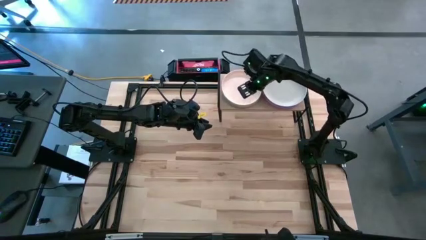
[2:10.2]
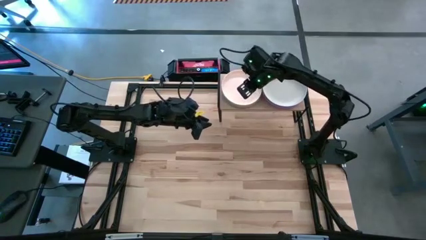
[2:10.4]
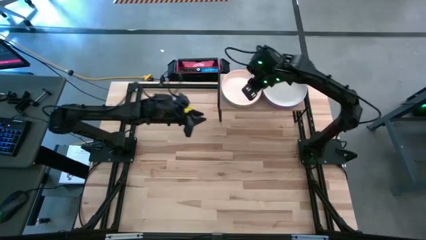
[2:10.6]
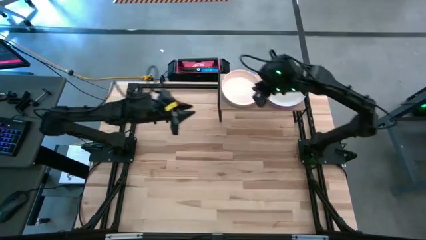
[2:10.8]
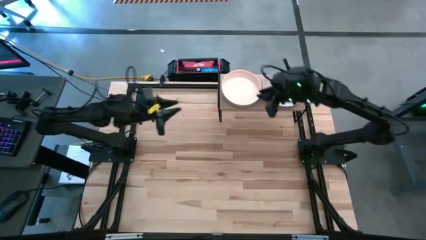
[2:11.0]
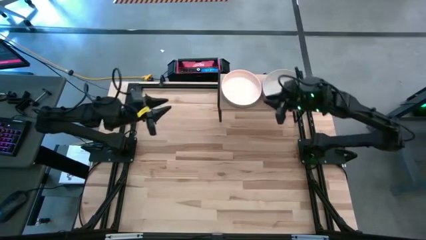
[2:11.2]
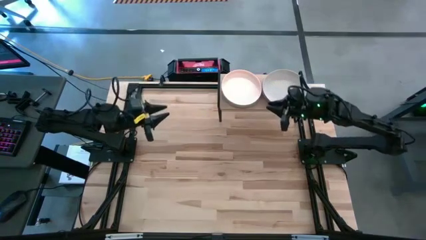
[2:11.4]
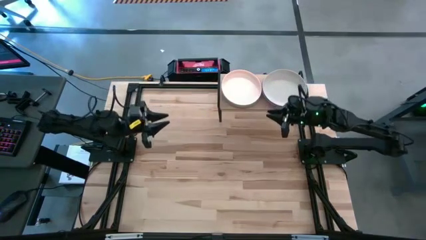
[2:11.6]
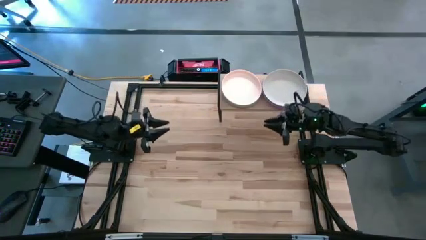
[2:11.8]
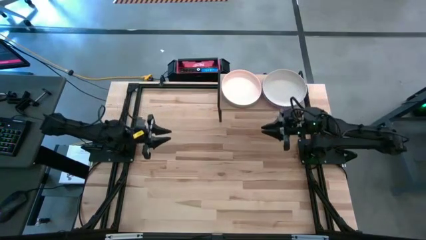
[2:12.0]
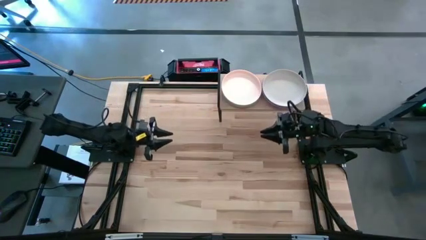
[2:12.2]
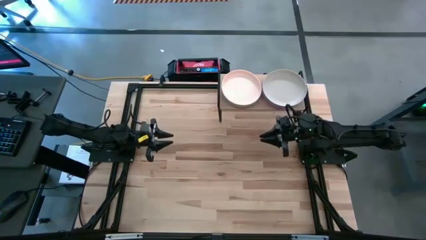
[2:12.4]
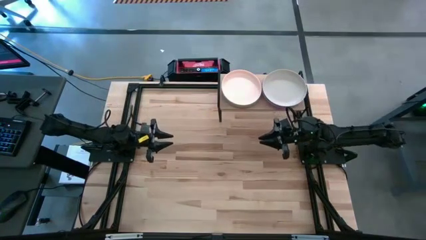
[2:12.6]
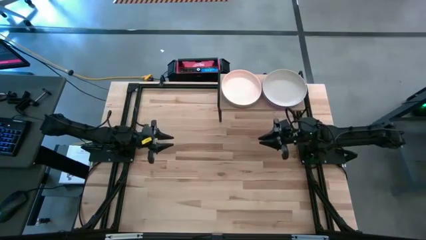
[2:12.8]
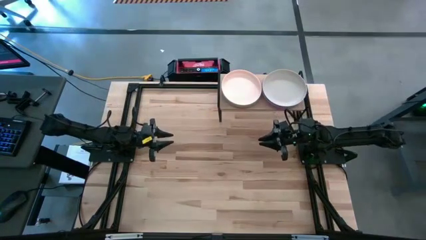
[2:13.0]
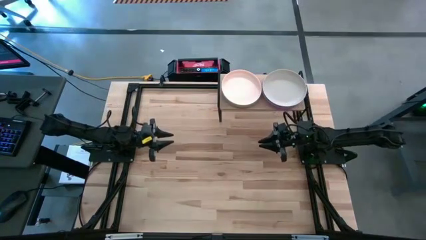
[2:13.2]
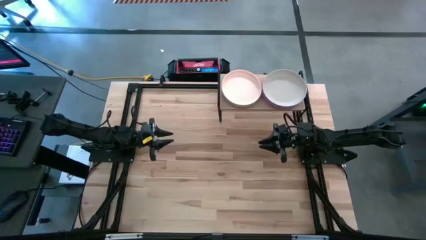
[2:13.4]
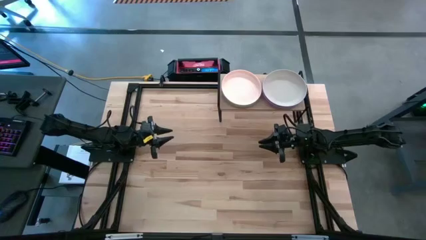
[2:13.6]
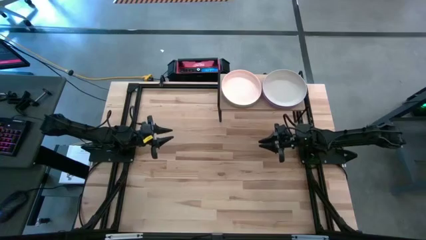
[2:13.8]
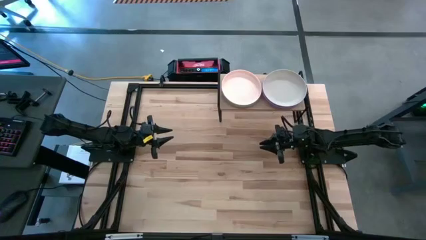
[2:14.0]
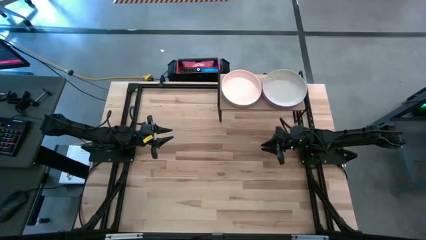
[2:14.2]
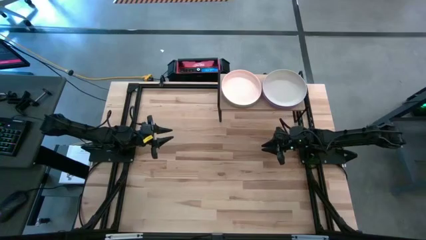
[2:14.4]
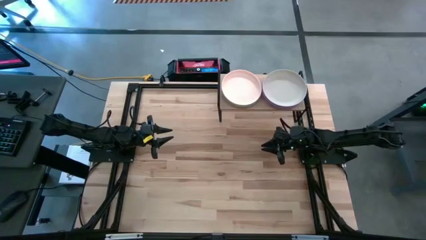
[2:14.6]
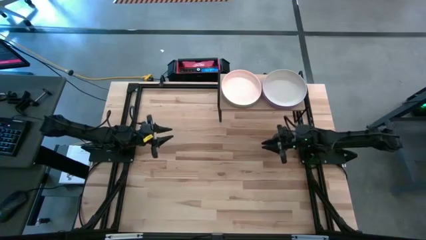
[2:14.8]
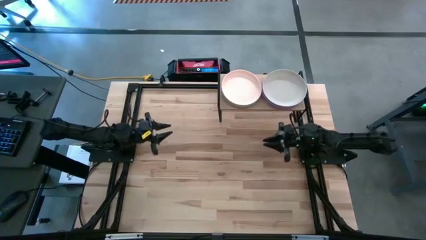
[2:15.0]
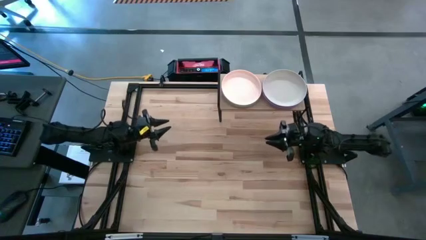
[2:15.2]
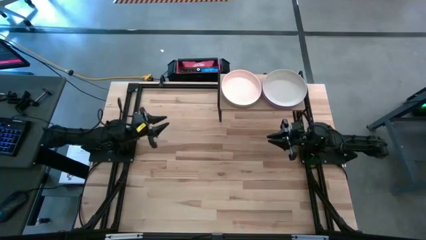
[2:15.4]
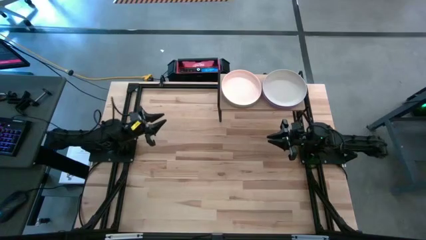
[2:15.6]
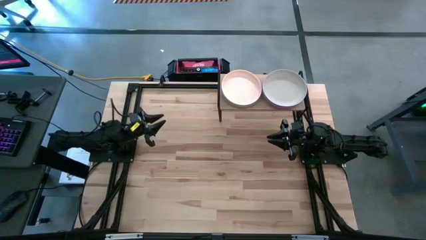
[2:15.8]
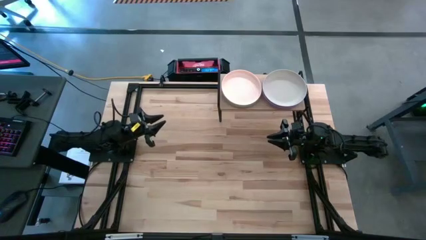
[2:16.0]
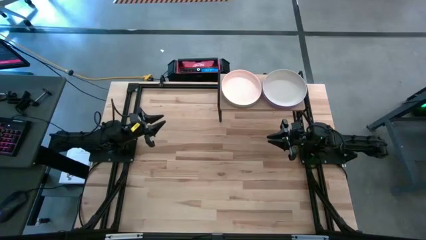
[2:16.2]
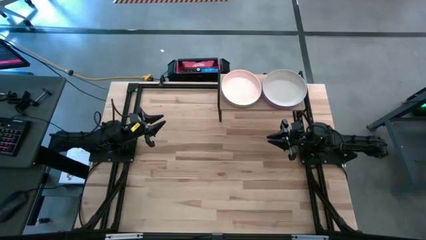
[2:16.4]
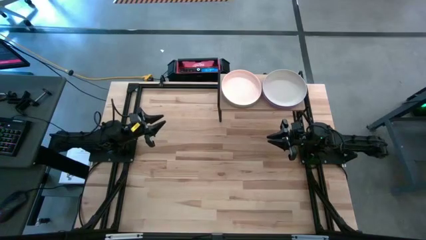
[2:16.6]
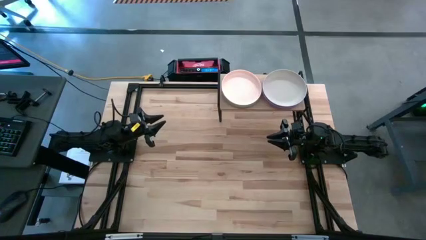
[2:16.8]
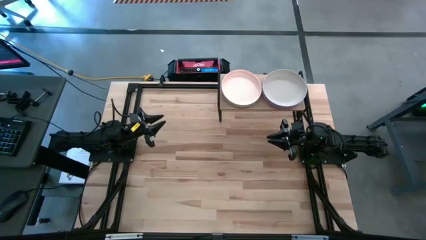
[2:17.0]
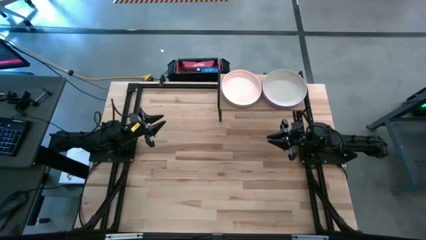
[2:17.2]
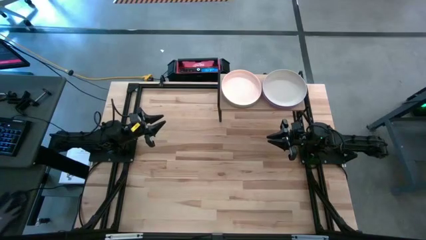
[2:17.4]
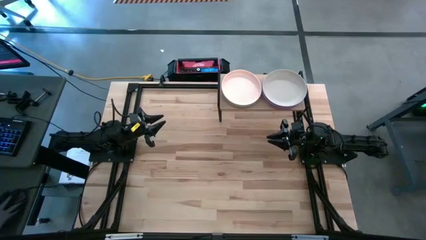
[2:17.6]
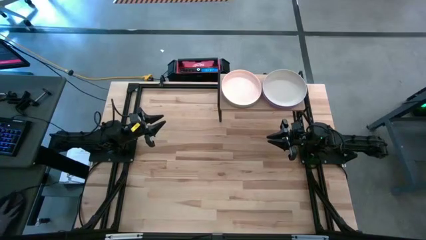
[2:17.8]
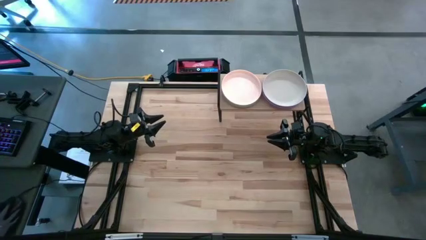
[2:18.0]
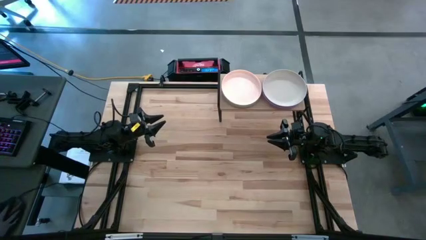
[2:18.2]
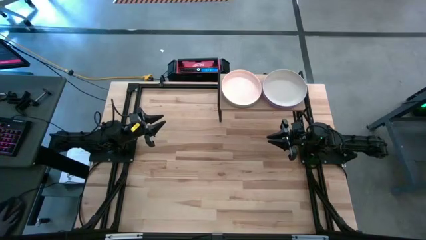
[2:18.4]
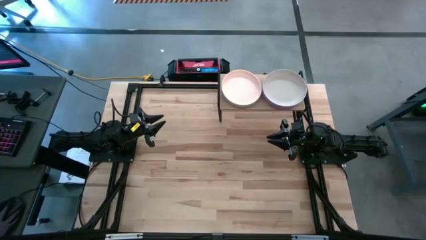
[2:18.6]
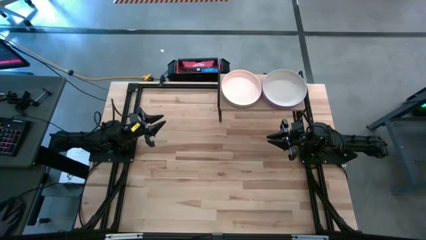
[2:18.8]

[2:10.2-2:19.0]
Task: Place and stack plates onto a shelf
Return to Home Position

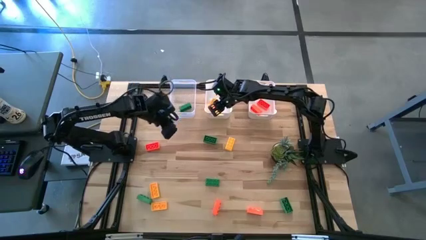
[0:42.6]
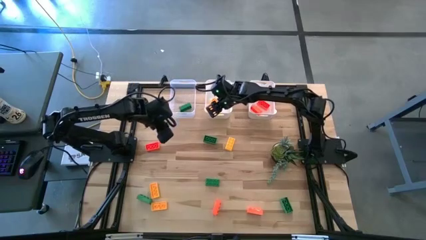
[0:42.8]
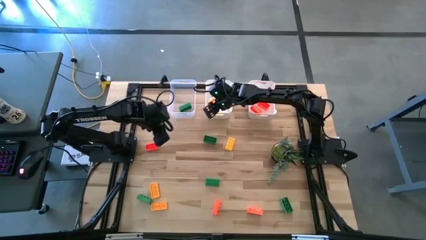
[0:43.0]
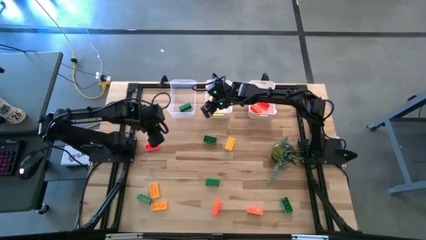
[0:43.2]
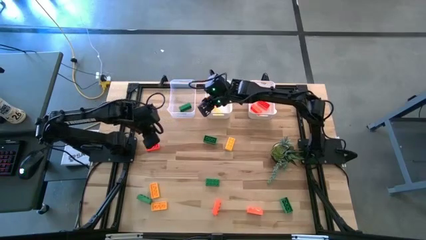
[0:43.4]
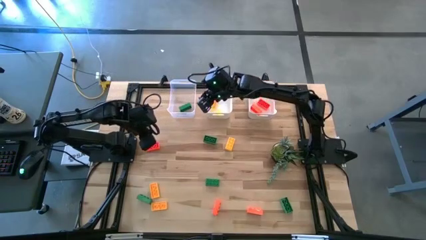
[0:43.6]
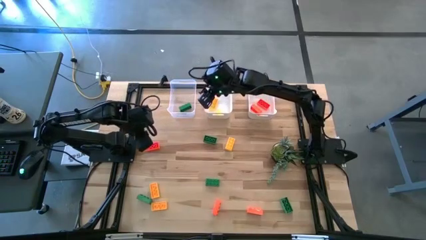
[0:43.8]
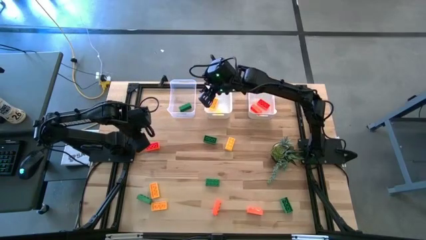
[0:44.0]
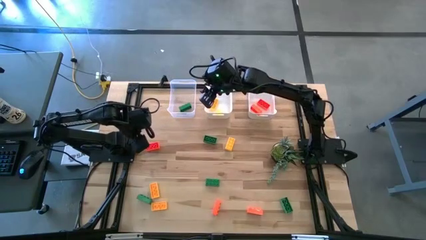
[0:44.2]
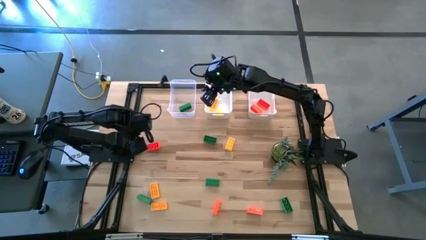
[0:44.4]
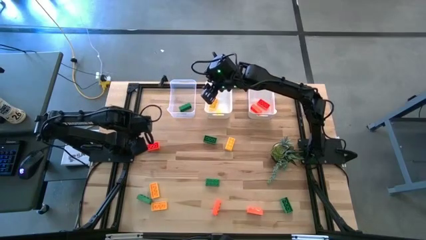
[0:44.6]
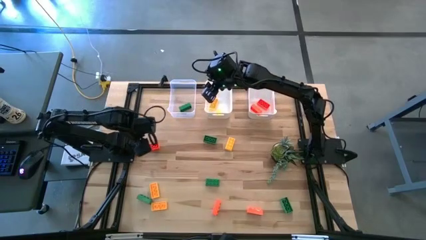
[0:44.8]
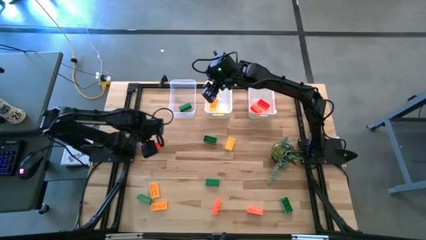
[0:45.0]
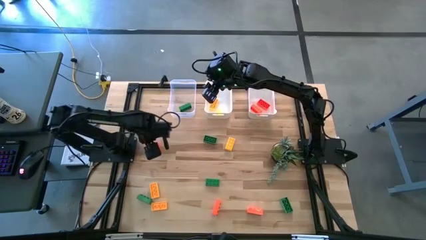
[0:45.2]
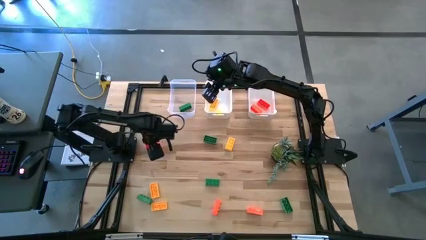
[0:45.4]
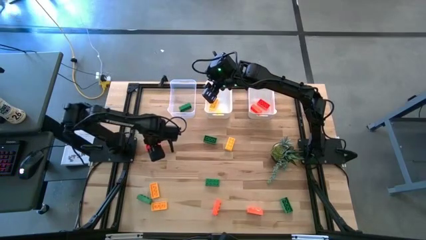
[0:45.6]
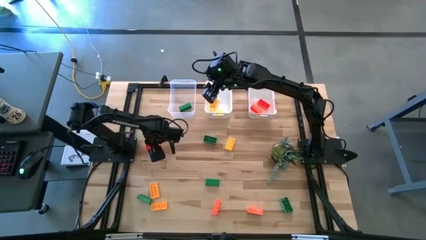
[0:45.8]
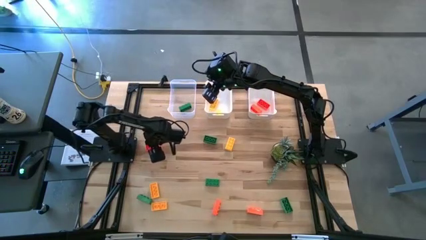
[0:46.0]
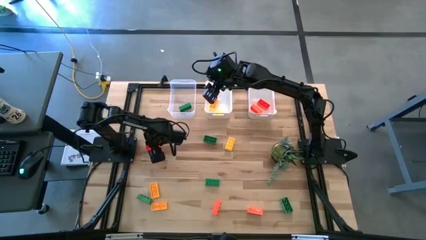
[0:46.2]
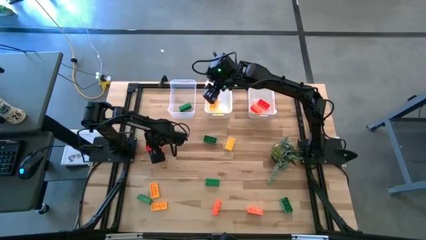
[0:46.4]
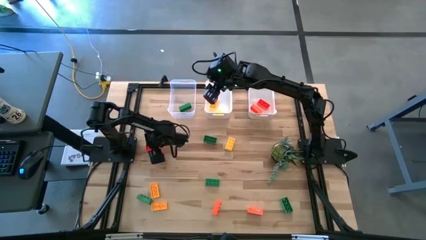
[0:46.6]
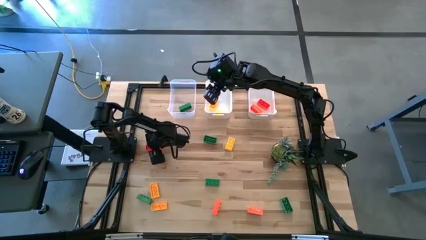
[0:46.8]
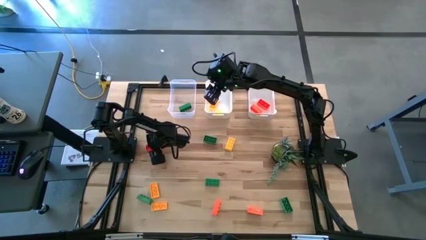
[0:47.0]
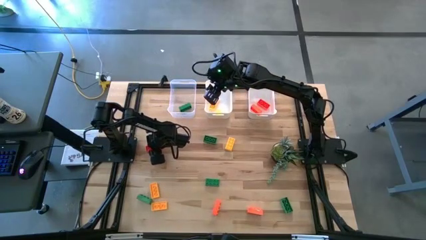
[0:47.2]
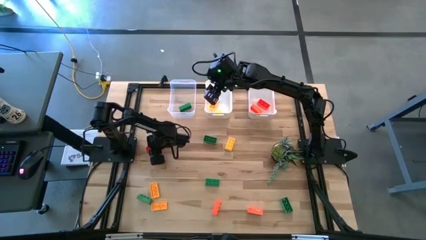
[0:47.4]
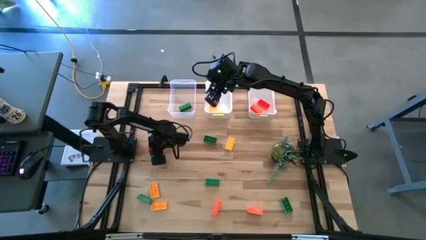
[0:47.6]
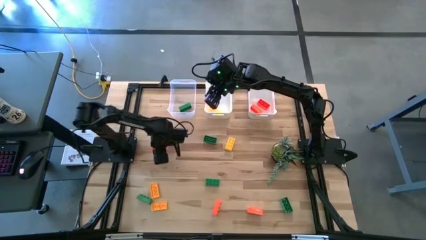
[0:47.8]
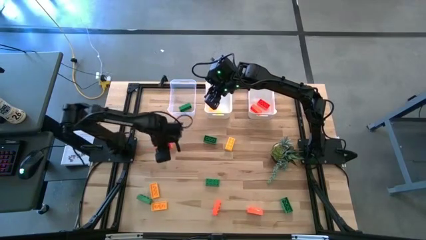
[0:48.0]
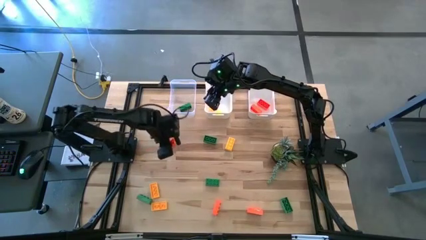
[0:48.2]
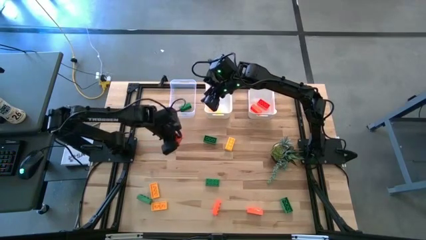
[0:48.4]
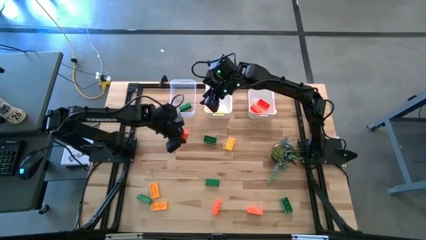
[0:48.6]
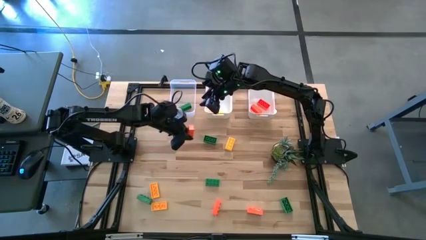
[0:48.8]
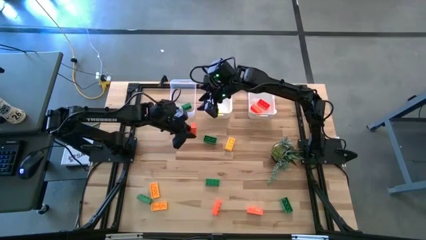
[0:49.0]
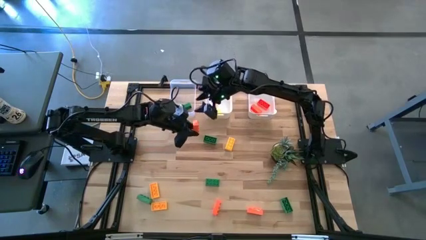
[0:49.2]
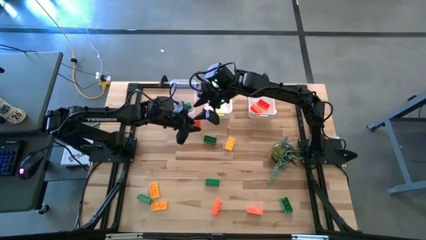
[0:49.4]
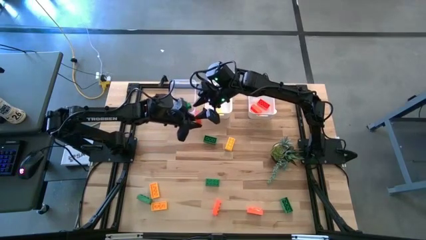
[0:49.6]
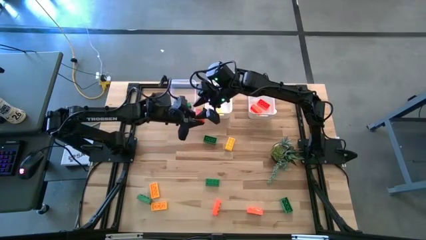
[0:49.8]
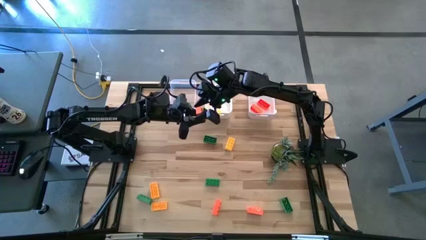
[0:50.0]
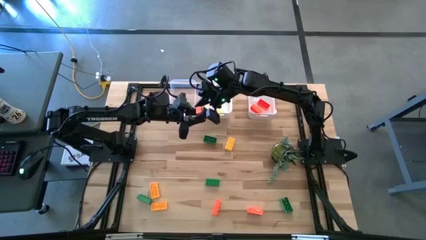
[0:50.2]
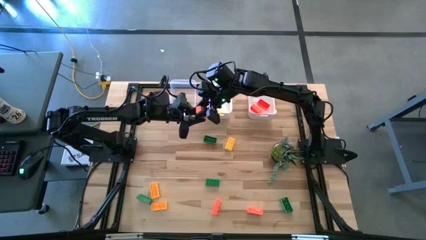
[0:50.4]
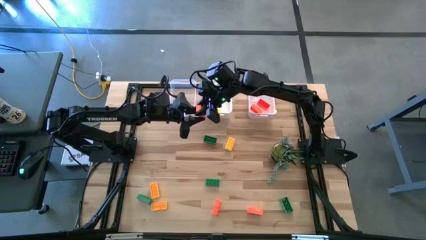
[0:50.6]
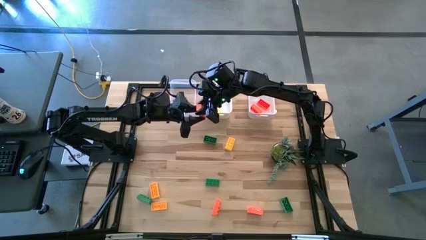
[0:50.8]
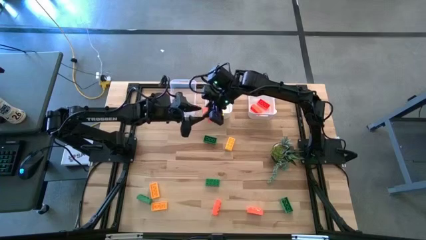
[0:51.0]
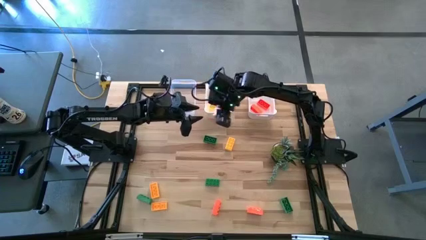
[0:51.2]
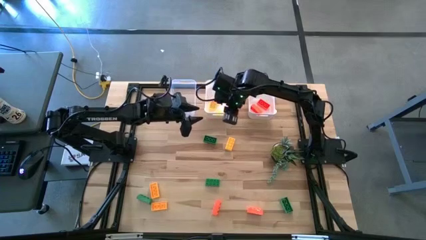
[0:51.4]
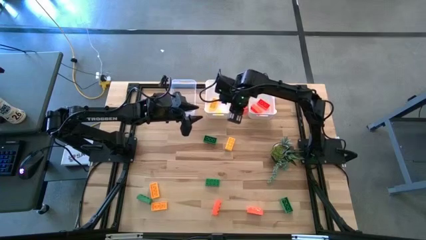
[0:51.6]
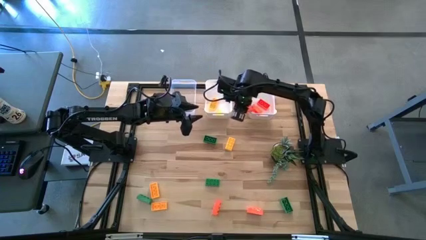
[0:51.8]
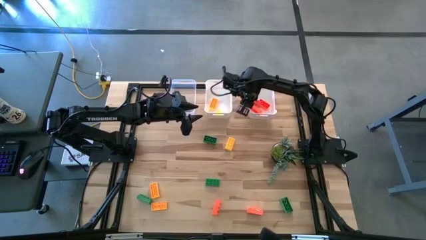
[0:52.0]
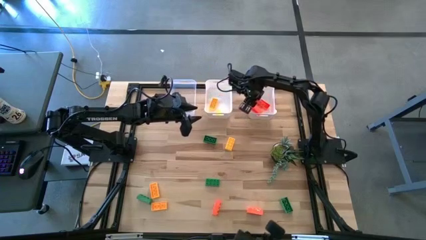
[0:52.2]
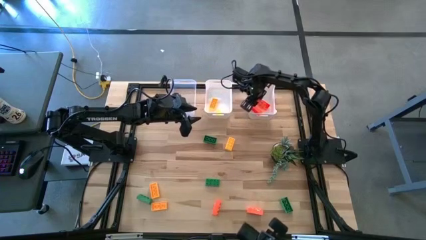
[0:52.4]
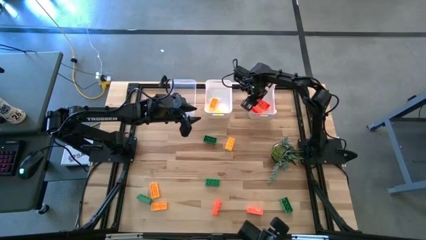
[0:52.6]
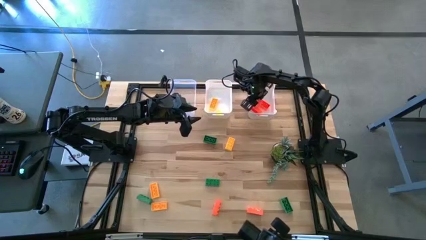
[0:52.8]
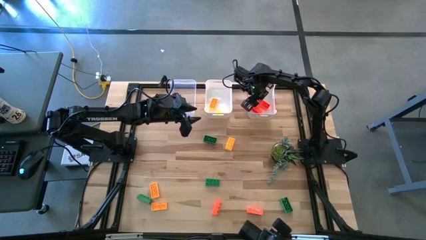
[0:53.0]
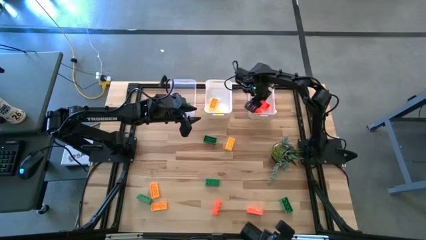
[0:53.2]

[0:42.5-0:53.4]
Task: Sort & place blocks by color
Put the orange game piece into the right white bin
